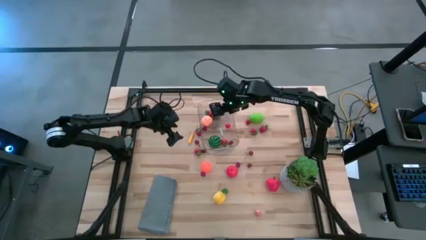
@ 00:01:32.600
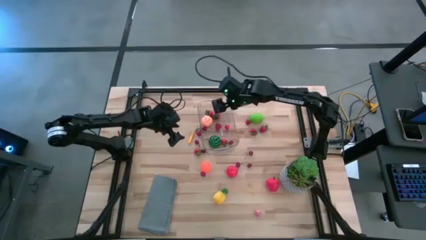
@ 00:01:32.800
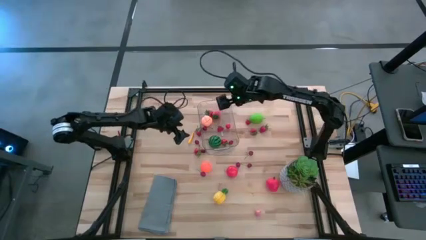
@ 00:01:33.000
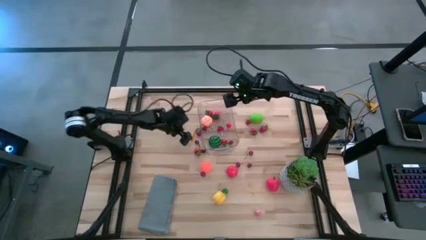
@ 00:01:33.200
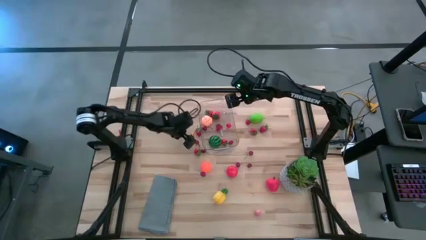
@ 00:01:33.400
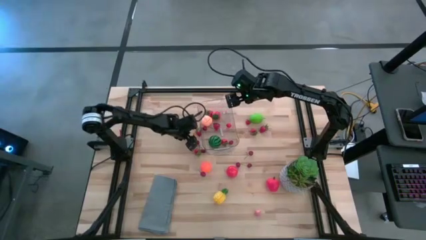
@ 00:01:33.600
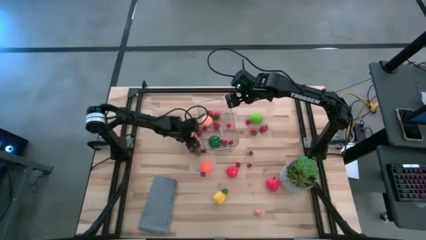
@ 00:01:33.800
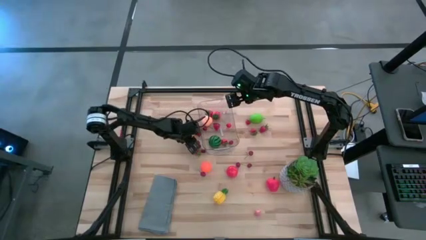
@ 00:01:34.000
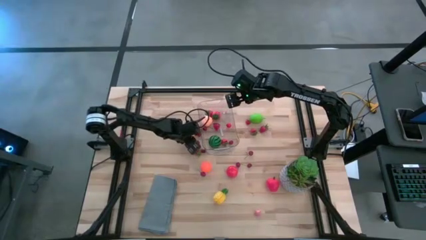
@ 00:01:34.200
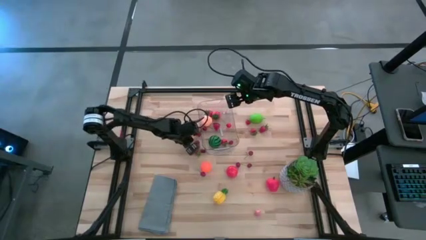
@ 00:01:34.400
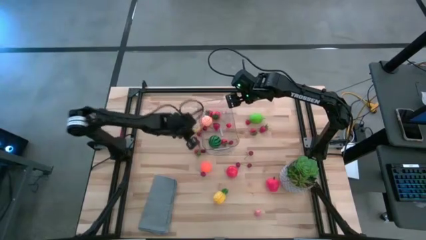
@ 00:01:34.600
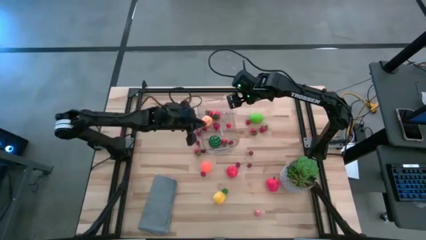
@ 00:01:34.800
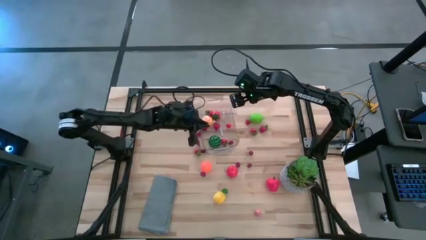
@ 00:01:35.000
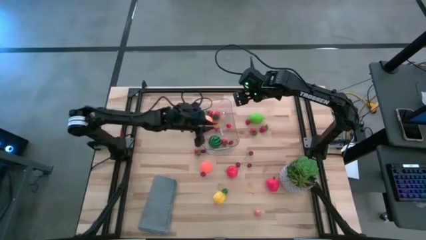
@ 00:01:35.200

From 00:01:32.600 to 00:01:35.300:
Task: Pick and placing Produce into tupperware
Put the yellow corn into the transparent container

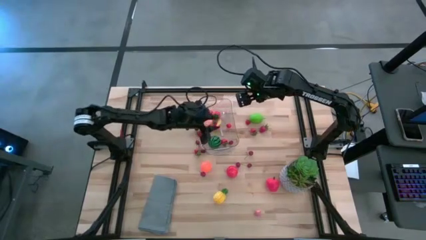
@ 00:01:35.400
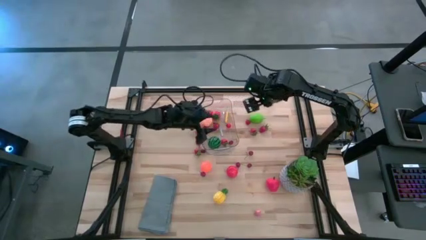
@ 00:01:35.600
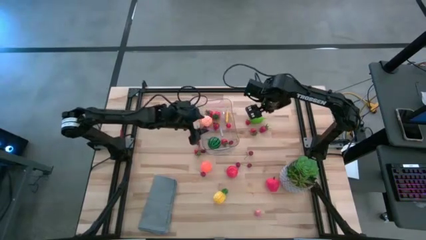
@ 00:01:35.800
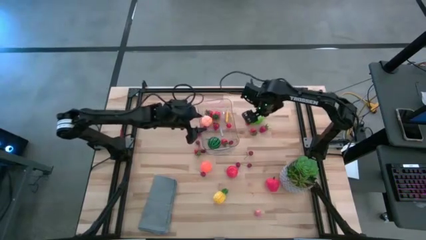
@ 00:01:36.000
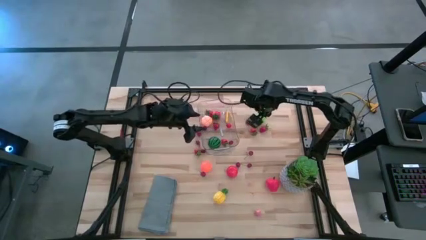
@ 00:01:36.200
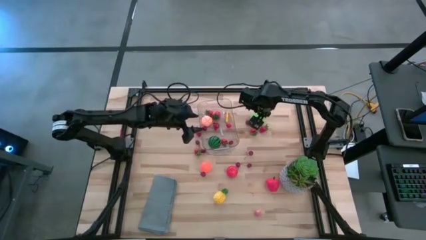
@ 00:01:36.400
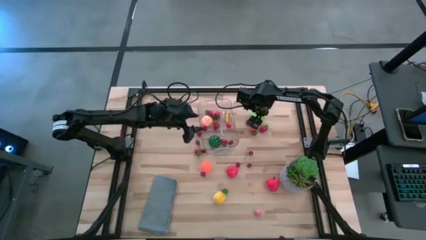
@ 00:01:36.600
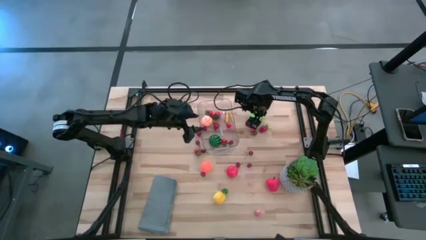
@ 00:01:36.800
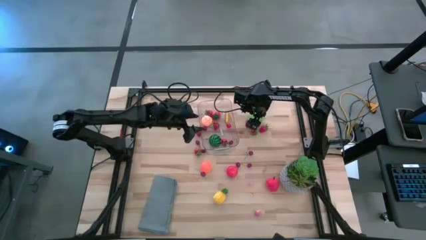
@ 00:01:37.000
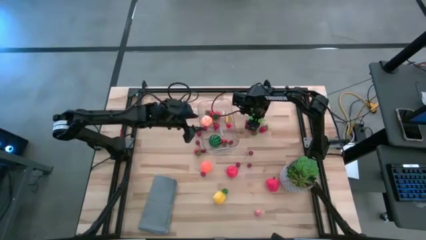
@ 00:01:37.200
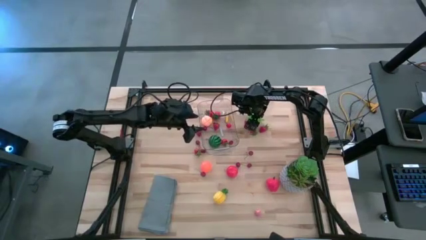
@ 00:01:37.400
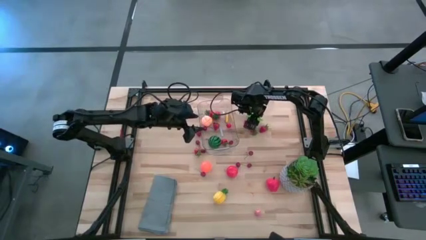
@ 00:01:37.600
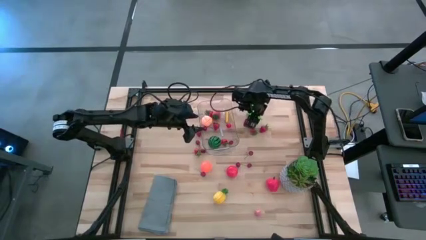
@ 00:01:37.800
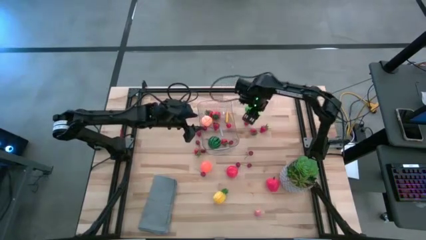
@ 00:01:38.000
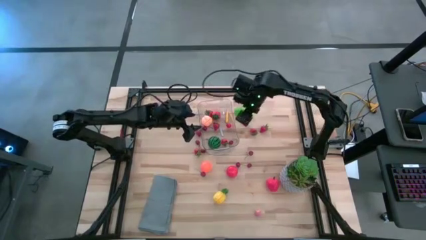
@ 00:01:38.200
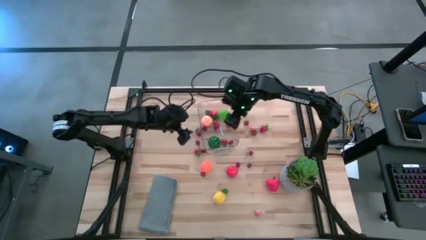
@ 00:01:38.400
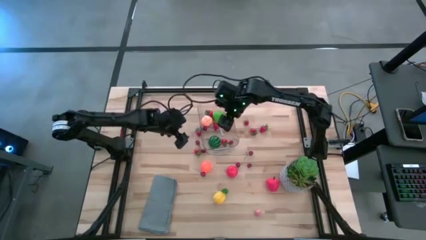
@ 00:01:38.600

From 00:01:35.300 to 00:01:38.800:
Put the green cabbage into the transparent container

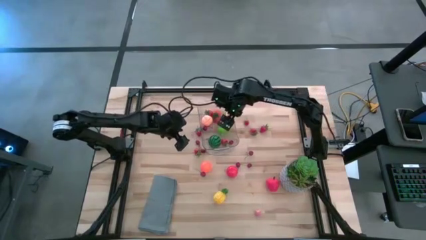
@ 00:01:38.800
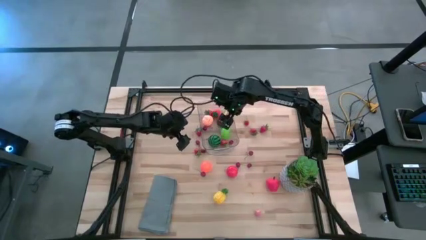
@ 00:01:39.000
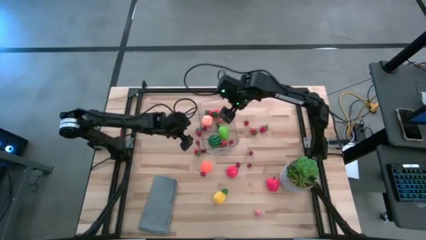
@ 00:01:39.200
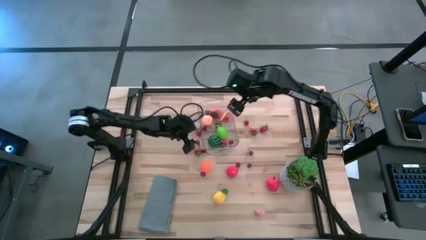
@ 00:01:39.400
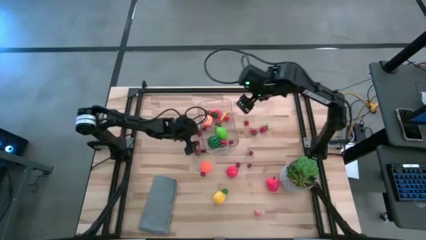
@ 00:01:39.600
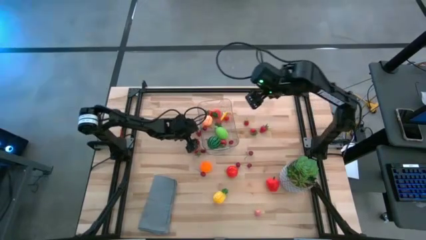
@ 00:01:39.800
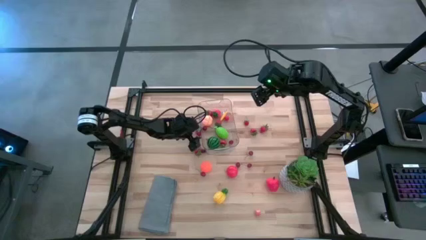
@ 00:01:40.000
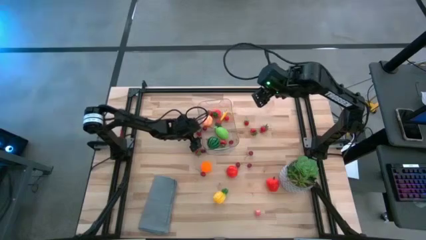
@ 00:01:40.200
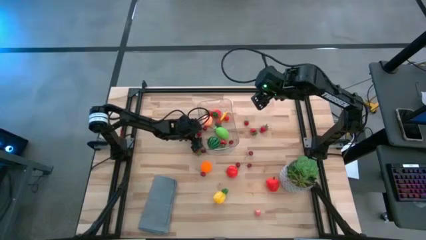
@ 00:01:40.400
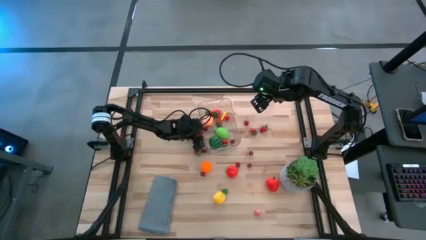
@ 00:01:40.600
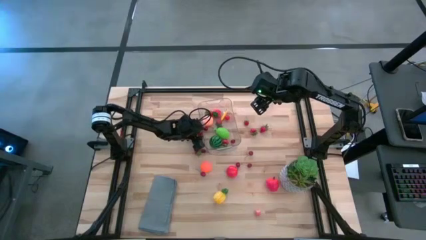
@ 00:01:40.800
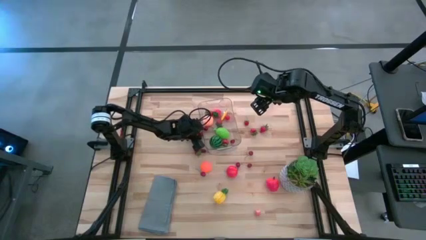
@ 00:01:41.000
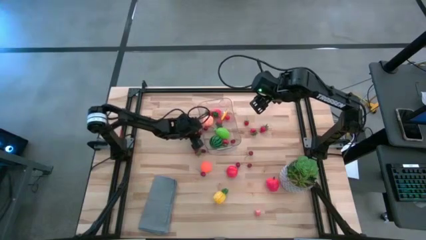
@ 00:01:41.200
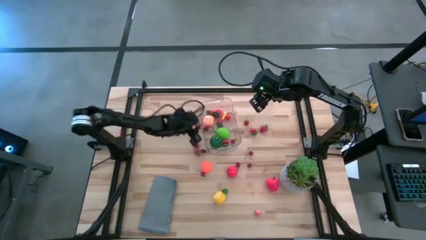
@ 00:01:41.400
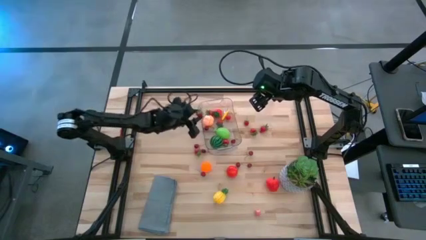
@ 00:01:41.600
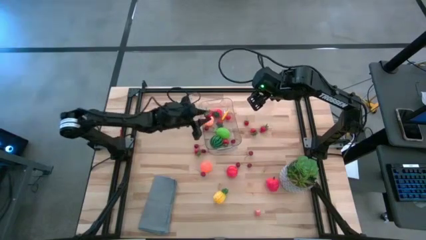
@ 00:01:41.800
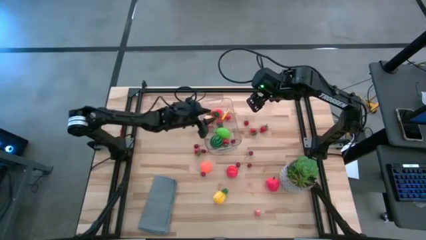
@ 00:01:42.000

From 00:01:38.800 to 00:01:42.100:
Put the red strawberry into the transparent container

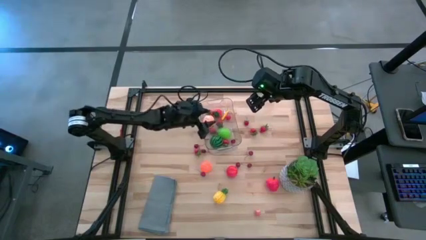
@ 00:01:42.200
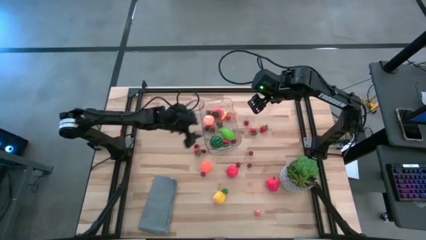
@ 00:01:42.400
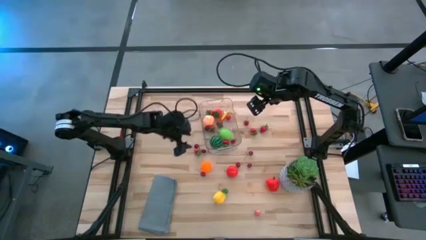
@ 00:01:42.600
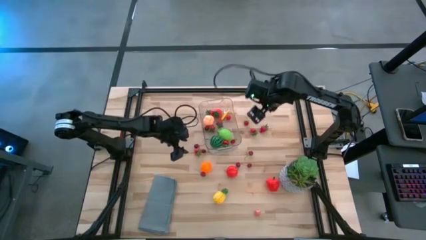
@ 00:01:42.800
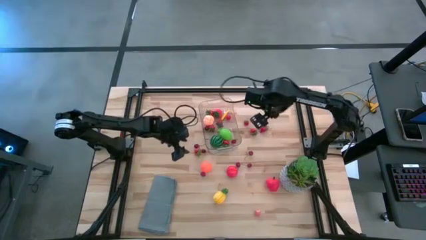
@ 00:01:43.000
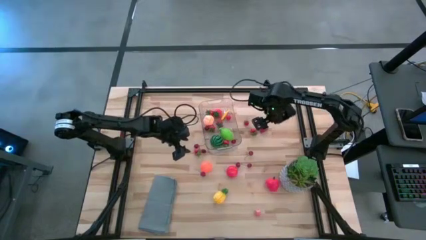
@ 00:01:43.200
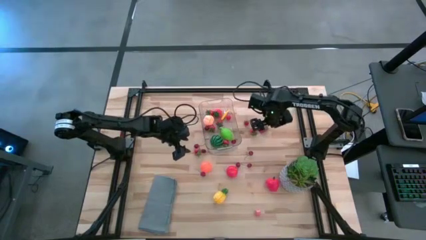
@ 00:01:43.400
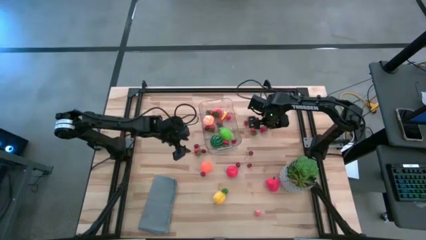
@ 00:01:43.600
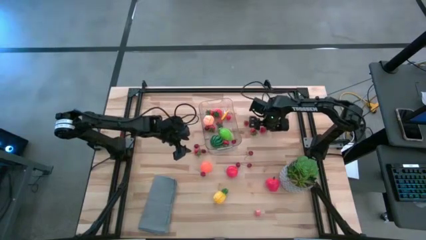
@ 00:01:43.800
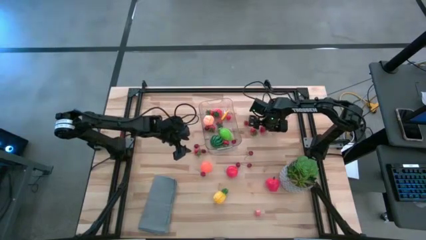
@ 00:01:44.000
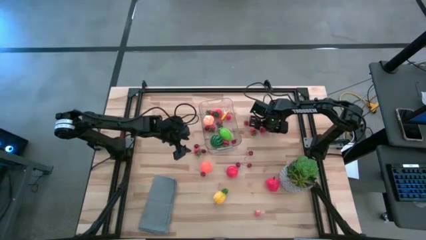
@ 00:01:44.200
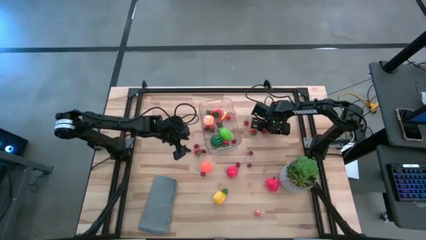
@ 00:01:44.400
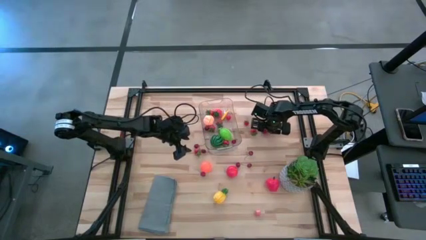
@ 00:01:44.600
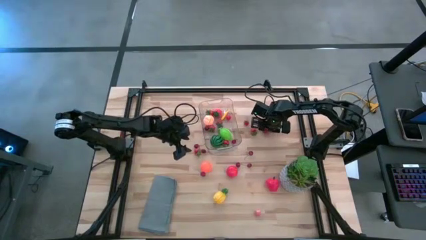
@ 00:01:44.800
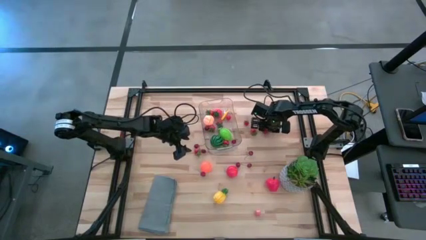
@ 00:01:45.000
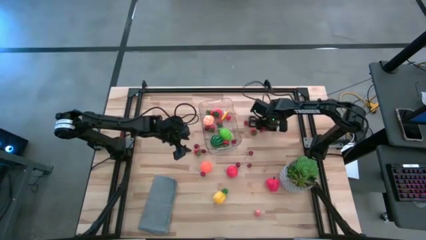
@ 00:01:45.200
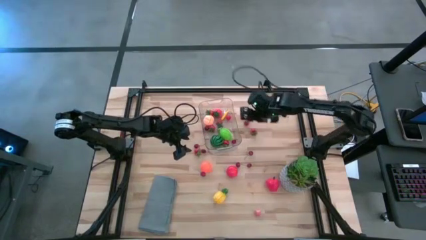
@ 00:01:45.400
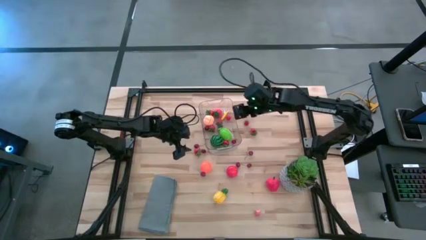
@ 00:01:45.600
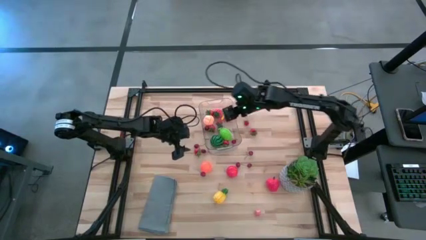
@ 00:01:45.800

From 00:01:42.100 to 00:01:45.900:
Put the red strawberry into the transparent container

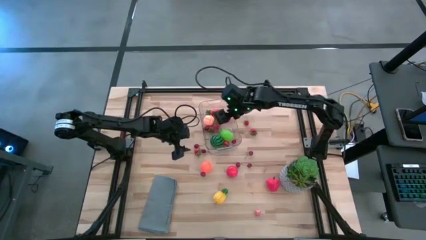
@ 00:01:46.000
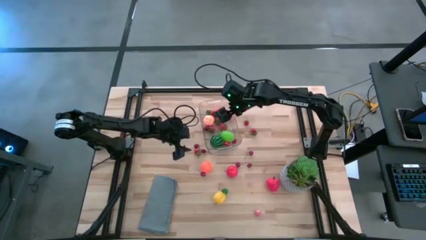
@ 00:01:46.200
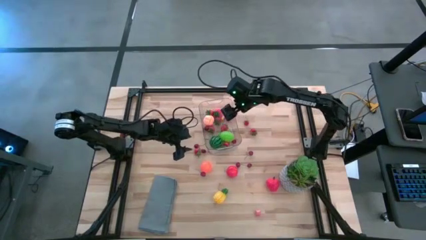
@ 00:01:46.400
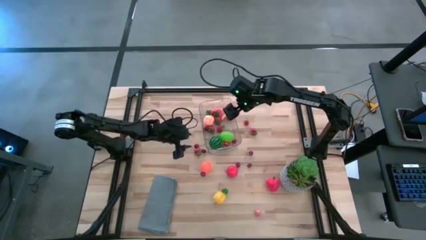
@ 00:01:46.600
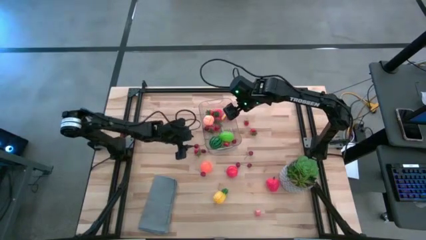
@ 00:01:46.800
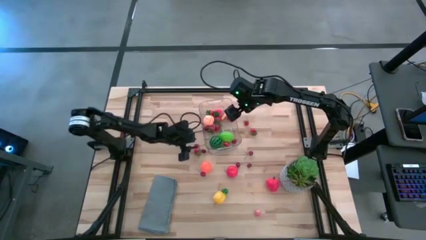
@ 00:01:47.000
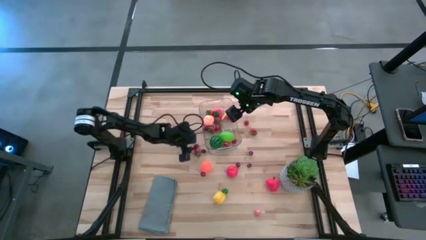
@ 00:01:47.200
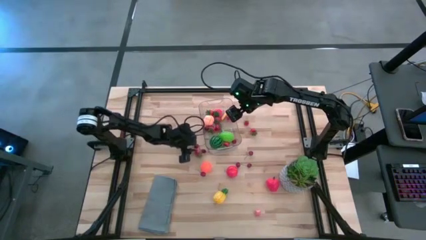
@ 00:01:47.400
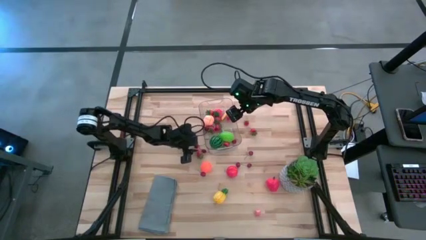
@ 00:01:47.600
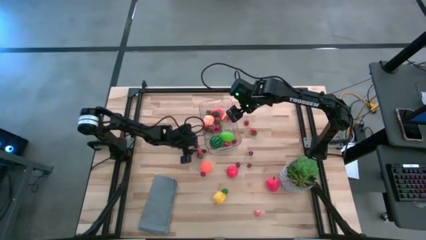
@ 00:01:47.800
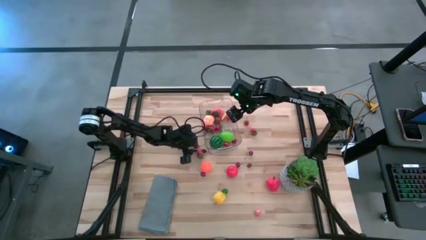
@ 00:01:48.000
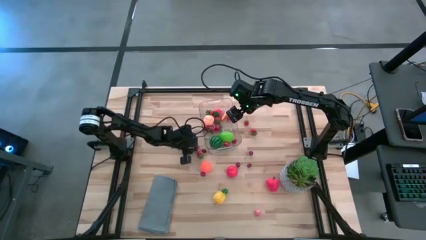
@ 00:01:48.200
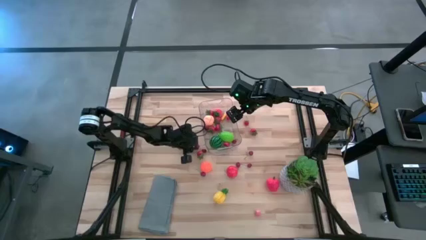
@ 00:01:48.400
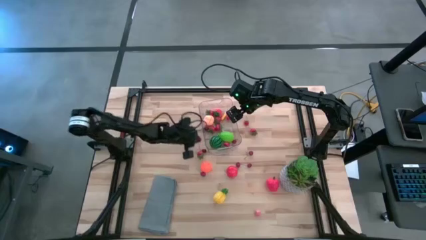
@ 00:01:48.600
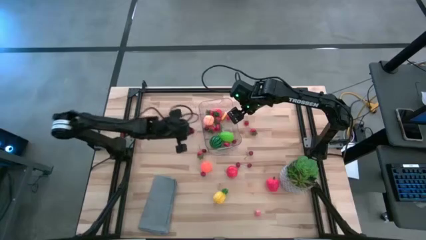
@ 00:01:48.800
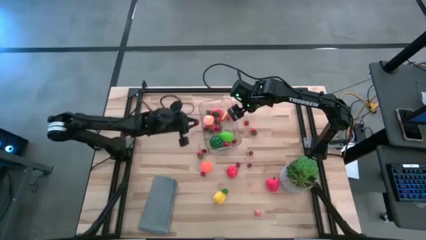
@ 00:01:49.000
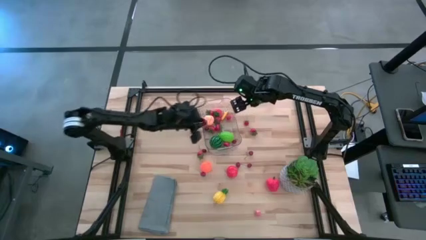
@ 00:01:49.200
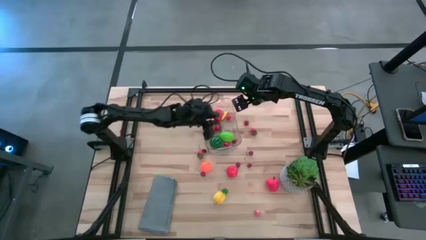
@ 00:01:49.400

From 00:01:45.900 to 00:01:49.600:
Put the red cherry into the transparent container
